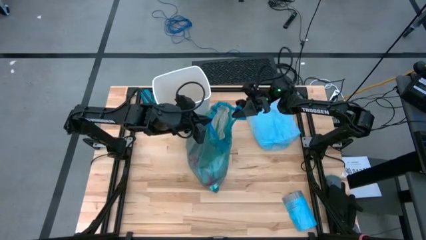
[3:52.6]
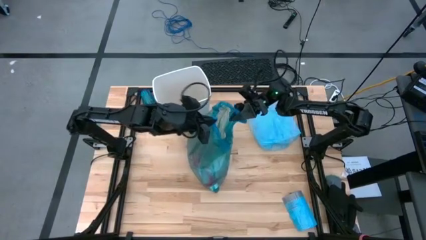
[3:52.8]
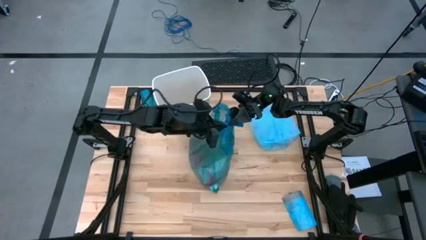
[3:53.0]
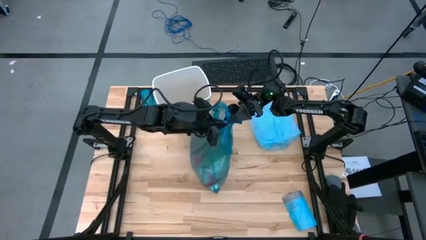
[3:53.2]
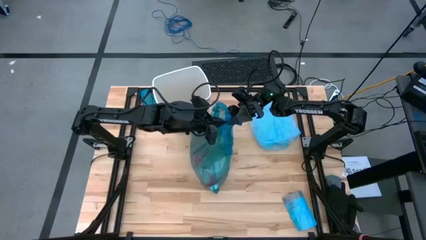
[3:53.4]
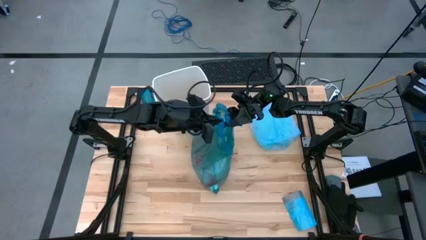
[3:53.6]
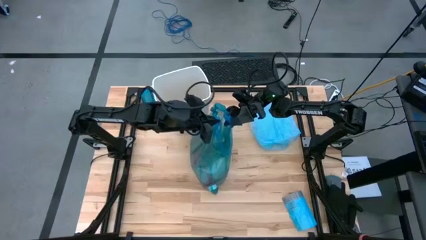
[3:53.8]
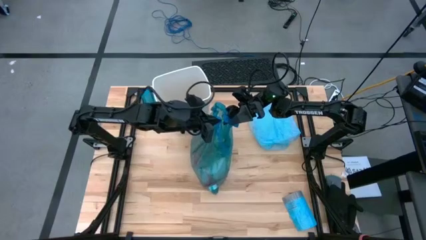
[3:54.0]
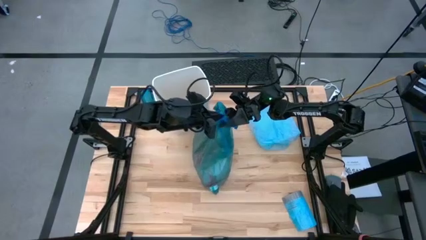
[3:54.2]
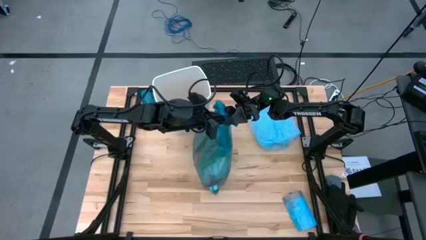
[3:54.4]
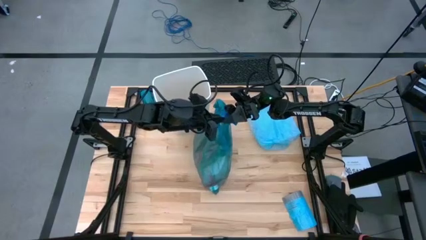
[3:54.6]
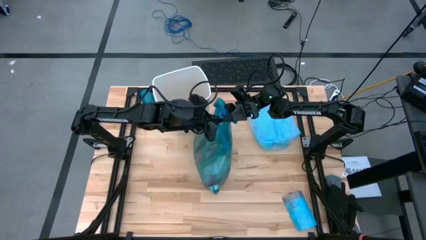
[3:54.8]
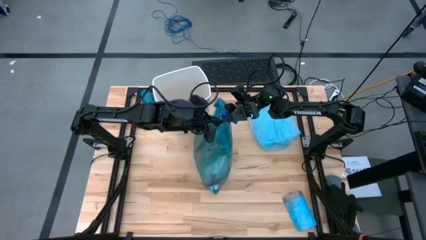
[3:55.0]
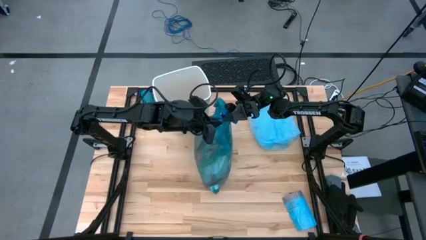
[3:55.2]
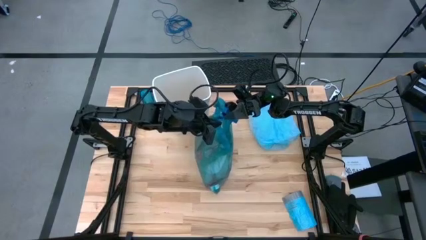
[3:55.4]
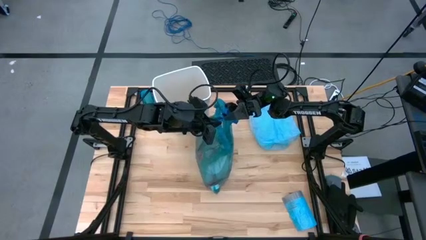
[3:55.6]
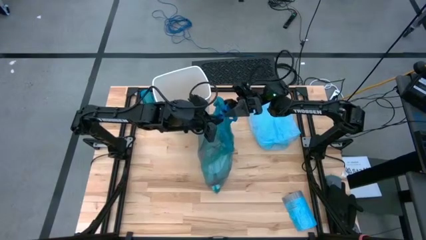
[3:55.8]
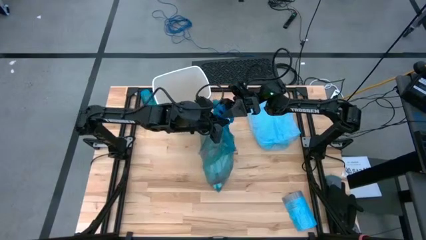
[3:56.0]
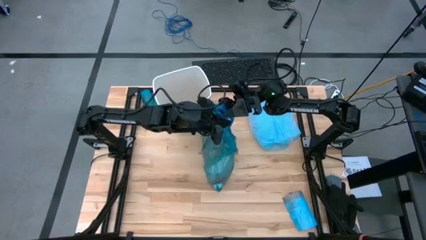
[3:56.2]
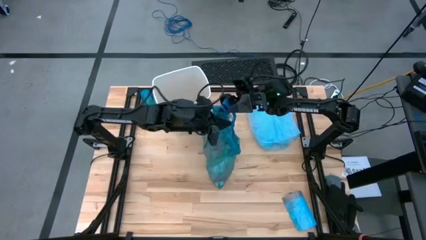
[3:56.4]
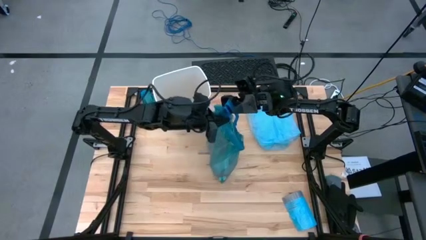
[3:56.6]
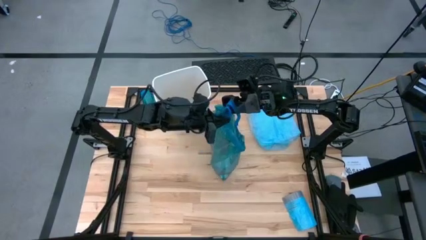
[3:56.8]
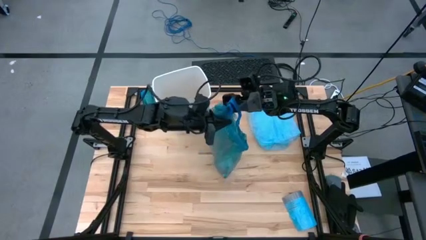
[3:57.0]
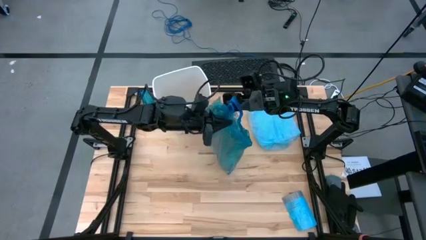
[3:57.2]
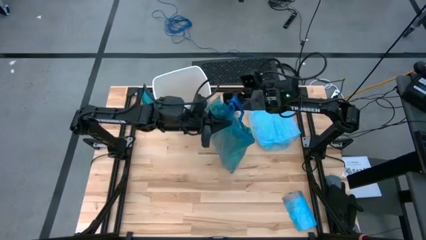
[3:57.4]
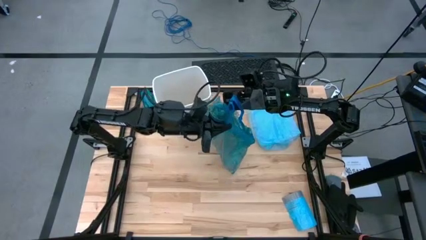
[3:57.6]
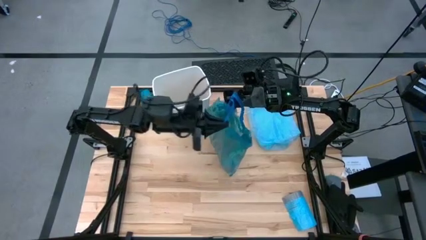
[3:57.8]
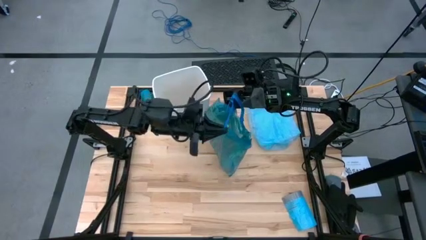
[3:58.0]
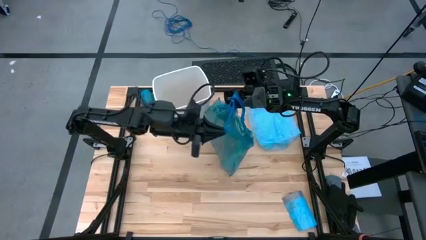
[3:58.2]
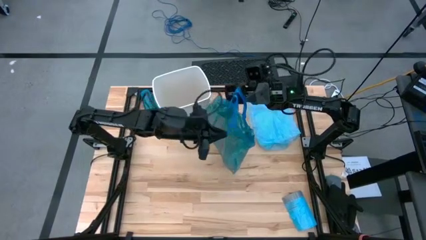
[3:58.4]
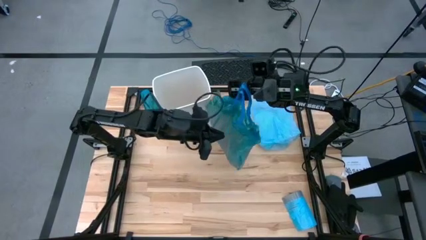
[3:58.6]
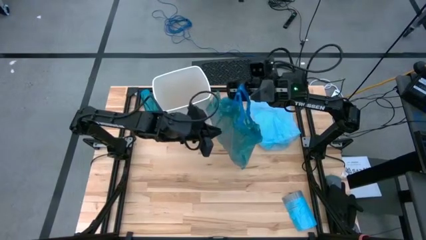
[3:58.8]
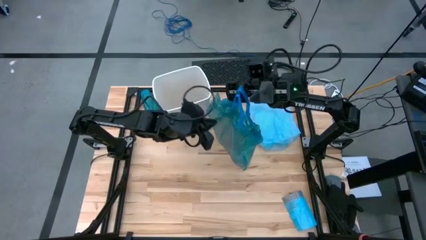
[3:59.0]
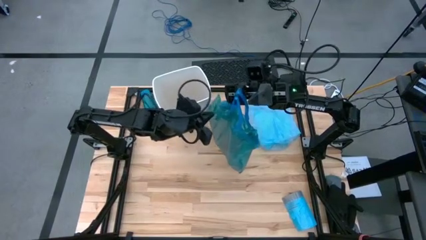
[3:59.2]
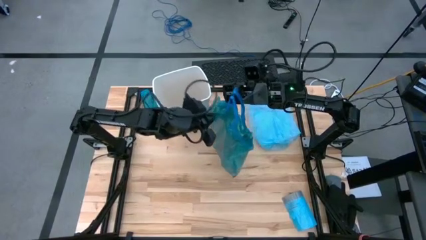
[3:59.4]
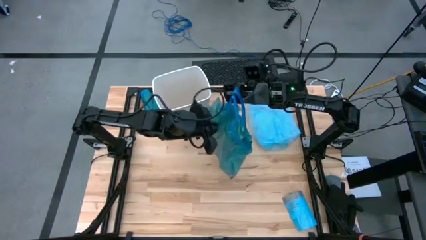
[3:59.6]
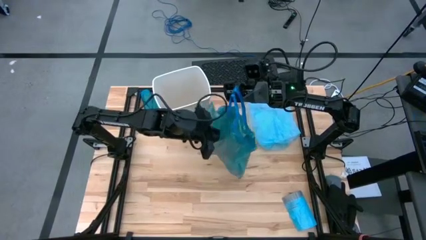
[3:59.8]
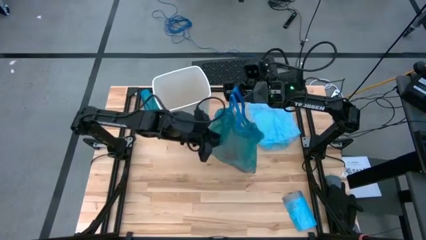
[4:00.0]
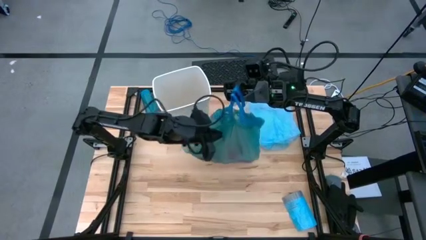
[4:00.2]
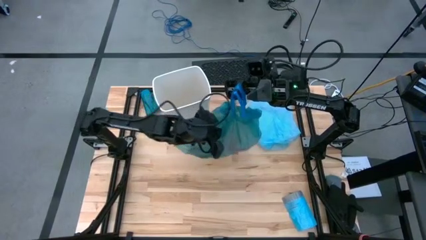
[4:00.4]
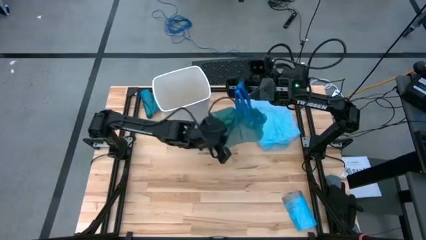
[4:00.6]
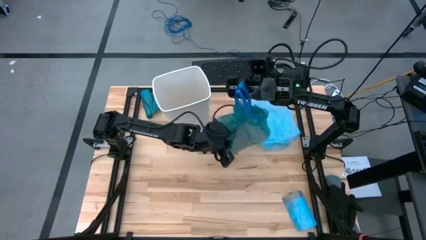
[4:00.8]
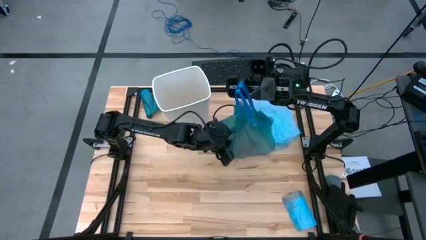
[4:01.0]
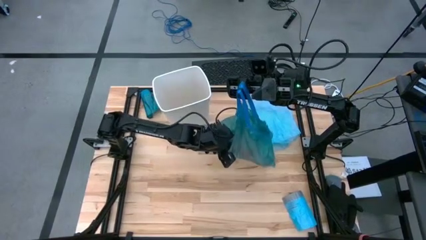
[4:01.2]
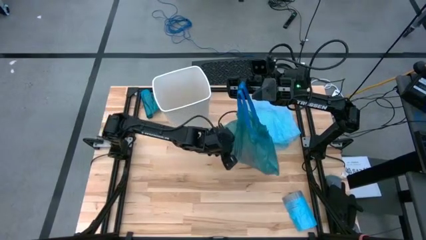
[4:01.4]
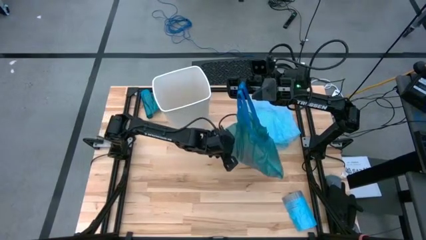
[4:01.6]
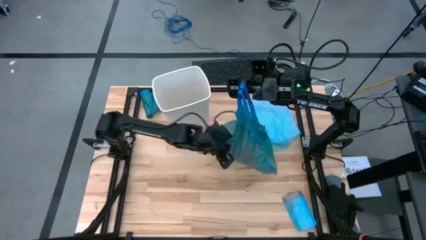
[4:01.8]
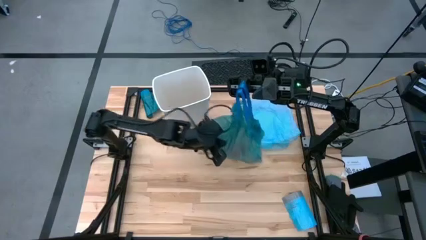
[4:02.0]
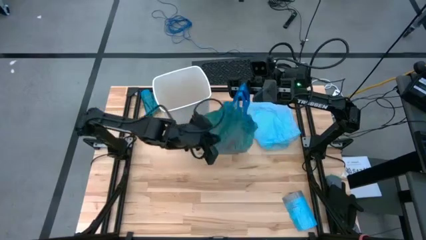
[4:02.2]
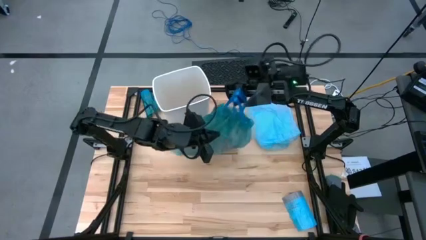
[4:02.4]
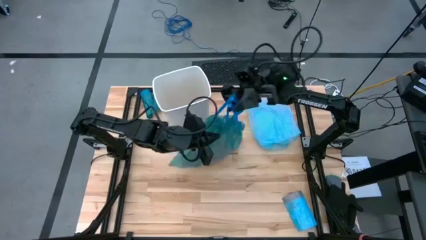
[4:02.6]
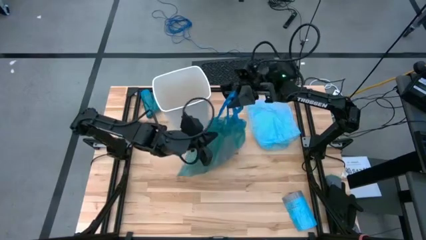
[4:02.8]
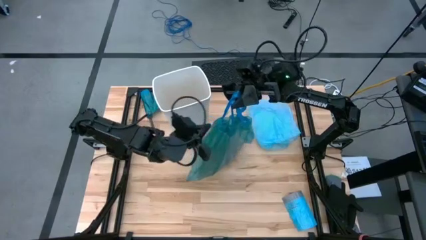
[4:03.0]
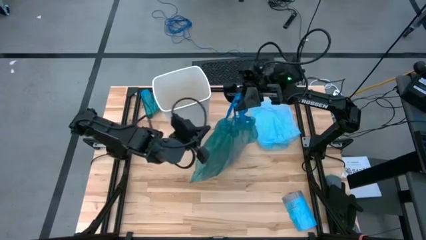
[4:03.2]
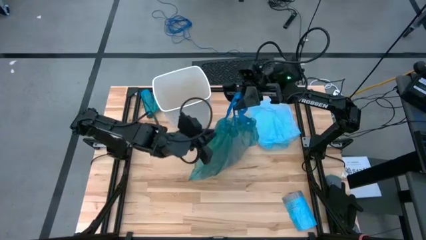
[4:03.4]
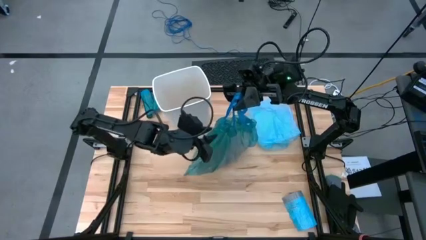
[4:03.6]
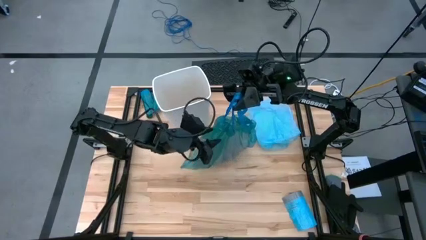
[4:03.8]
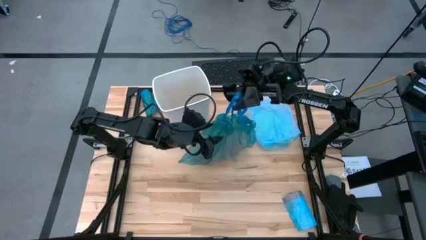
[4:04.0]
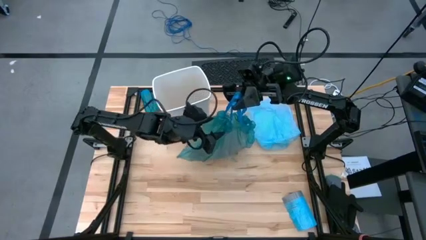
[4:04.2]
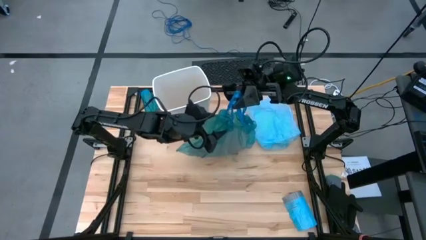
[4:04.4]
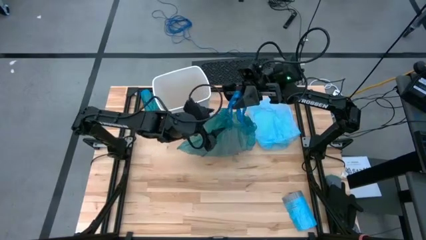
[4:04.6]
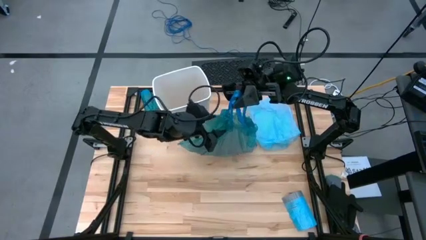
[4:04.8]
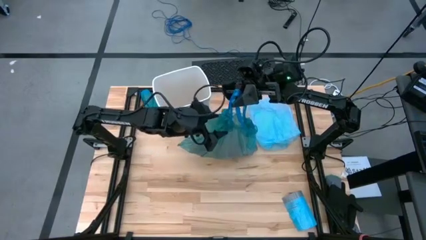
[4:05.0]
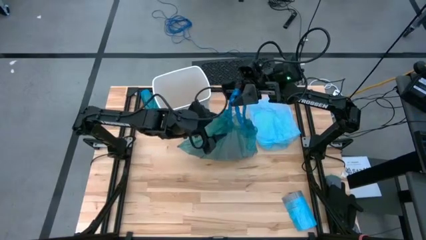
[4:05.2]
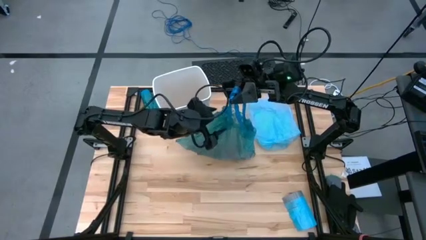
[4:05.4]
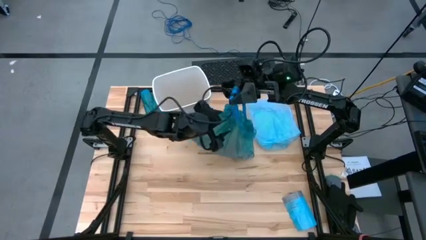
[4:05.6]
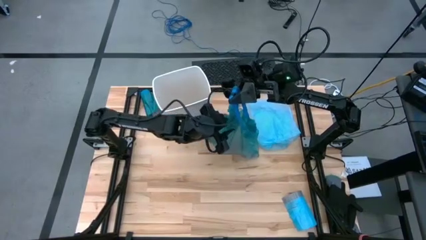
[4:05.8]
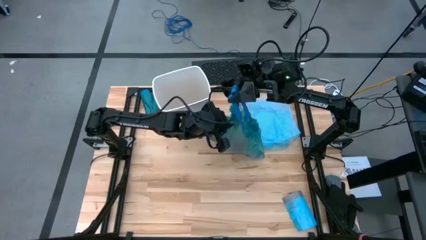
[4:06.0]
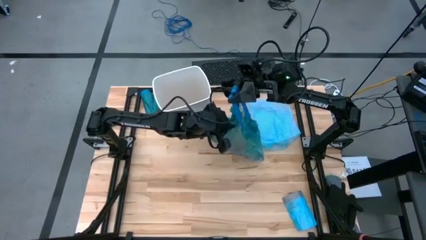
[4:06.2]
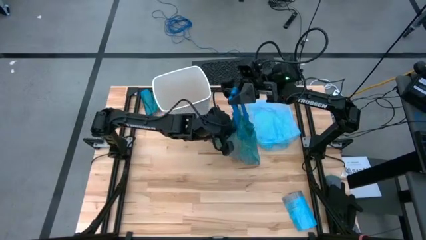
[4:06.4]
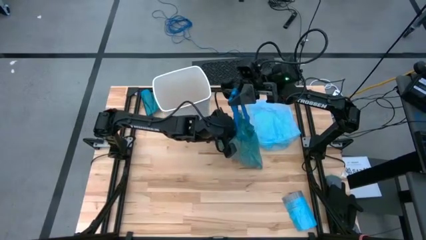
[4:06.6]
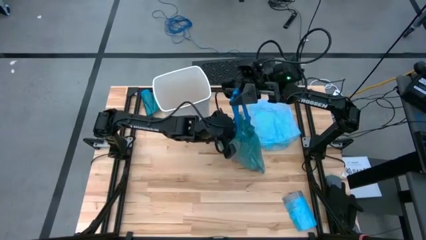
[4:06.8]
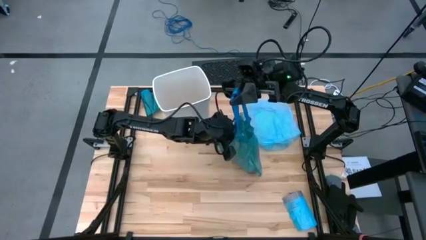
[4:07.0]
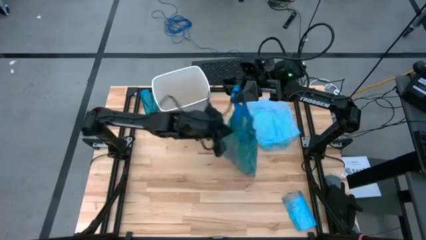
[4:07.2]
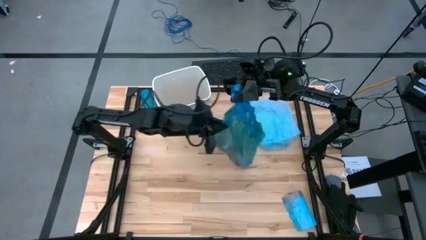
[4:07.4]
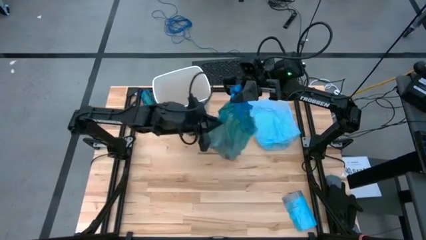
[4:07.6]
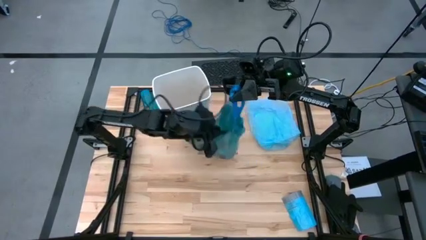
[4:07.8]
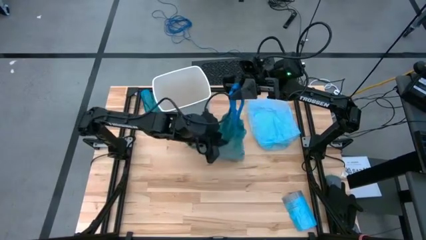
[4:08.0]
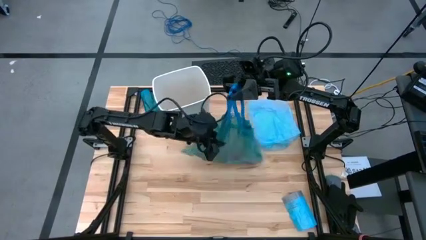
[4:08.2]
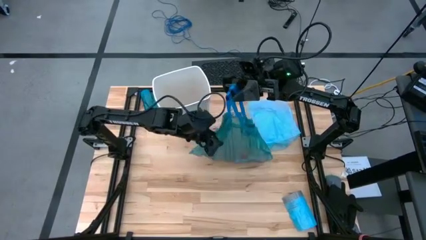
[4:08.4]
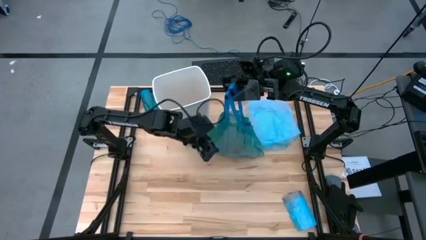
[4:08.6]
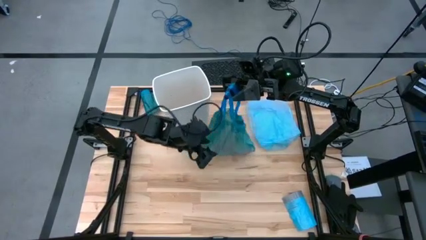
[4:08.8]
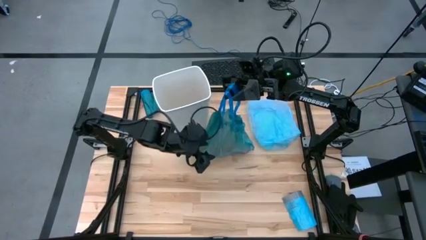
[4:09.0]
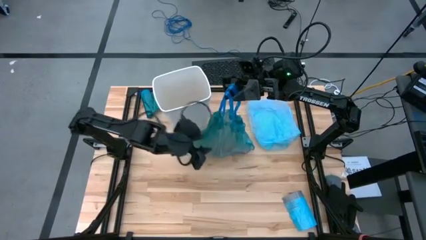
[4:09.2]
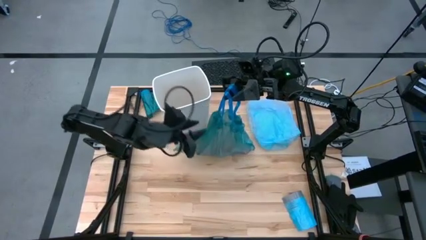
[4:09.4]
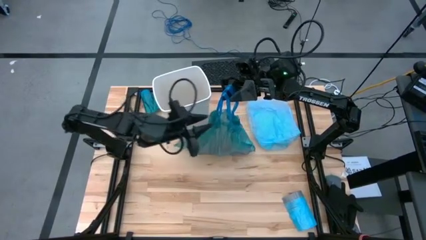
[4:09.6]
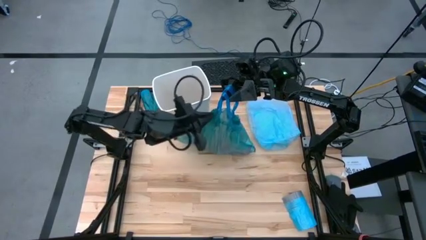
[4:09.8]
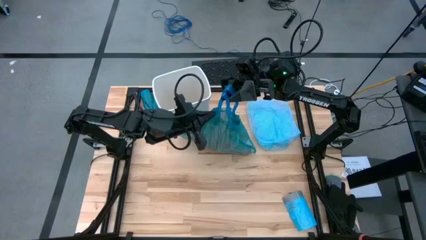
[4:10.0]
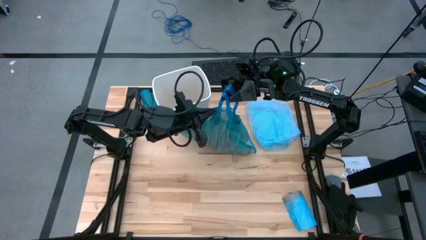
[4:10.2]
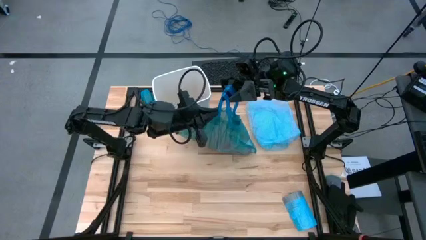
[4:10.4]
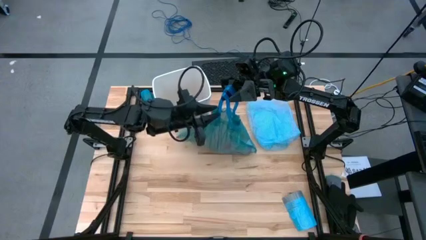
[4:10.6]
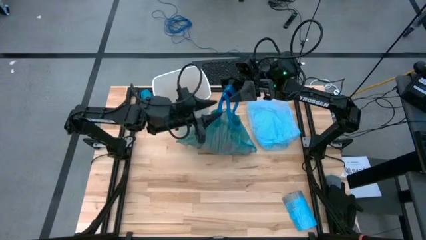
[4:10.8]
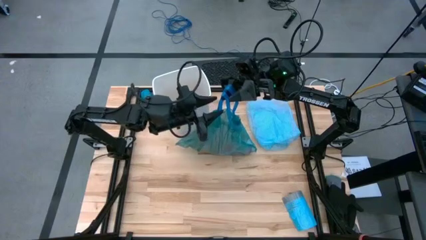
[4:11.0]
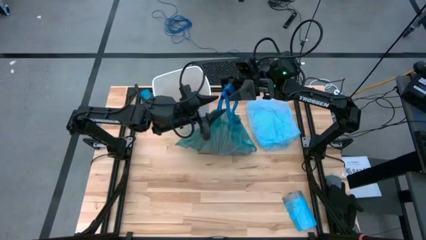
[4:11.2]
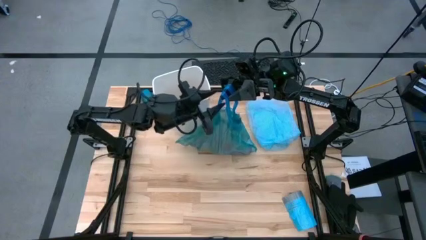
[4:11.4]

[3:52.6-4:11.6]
Task: place trash/remove bag and relplace
Close the blue trash bag
